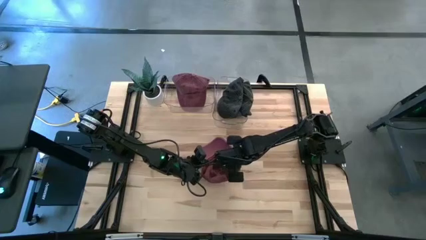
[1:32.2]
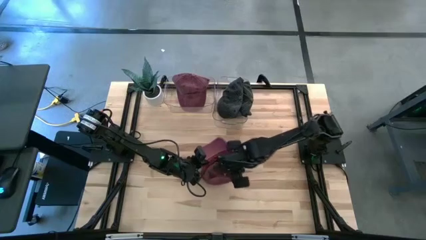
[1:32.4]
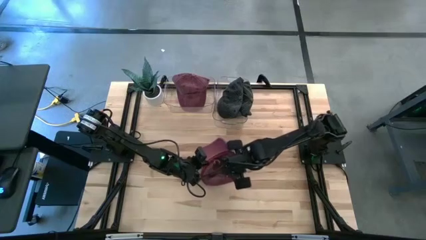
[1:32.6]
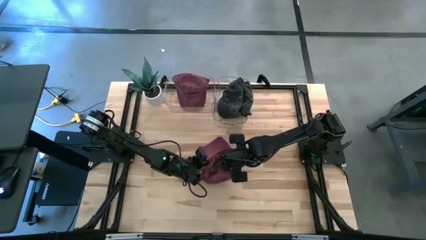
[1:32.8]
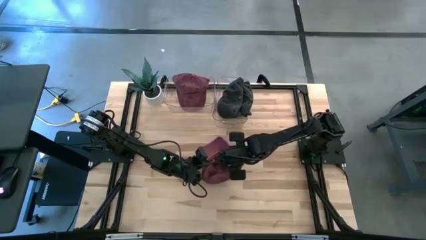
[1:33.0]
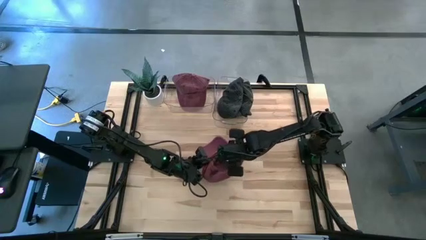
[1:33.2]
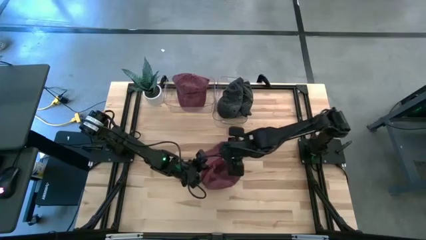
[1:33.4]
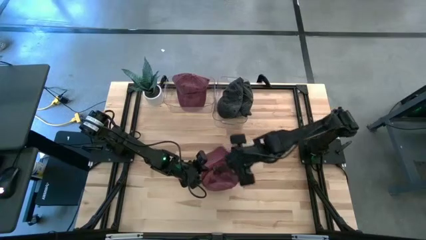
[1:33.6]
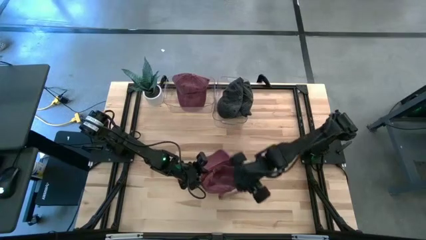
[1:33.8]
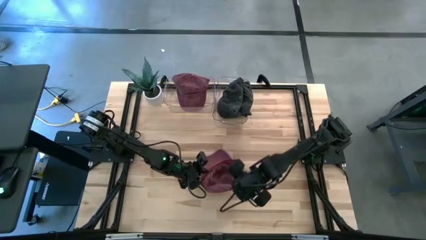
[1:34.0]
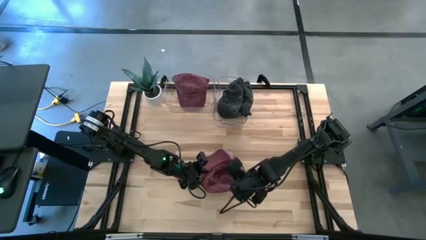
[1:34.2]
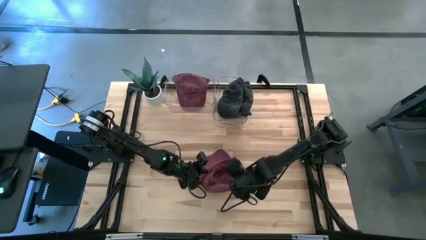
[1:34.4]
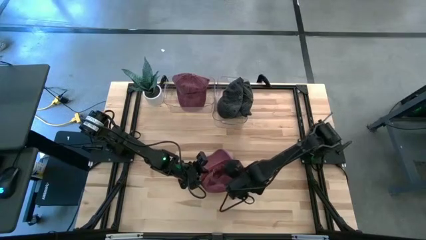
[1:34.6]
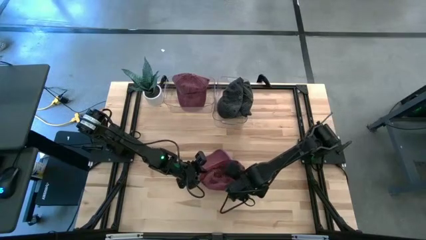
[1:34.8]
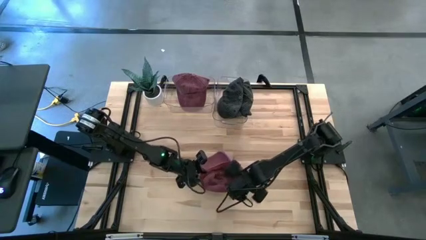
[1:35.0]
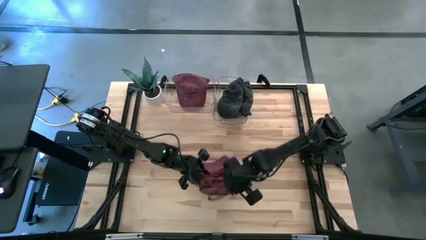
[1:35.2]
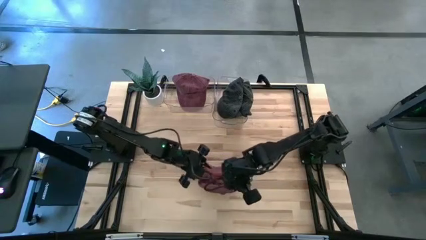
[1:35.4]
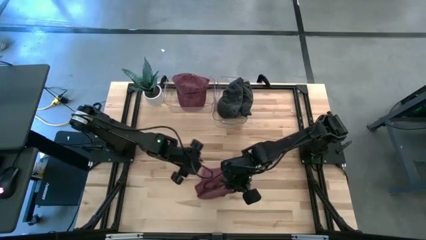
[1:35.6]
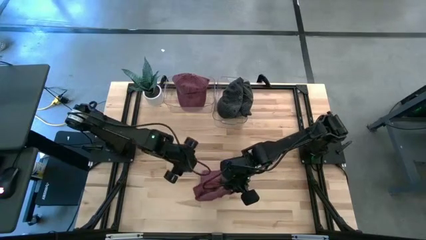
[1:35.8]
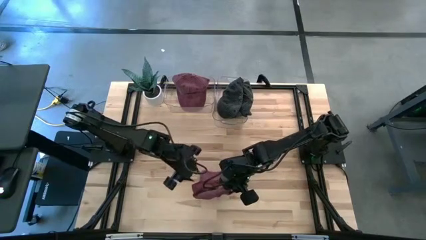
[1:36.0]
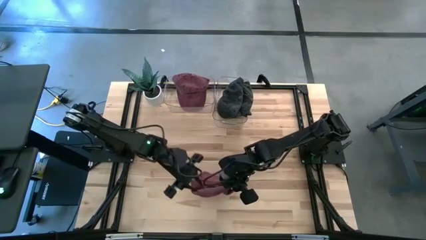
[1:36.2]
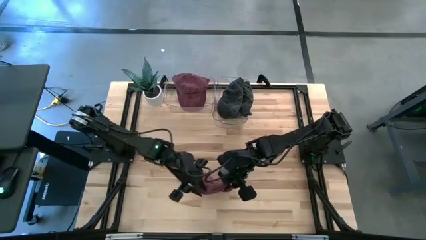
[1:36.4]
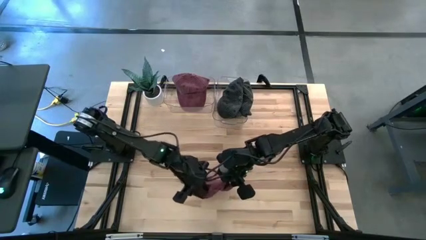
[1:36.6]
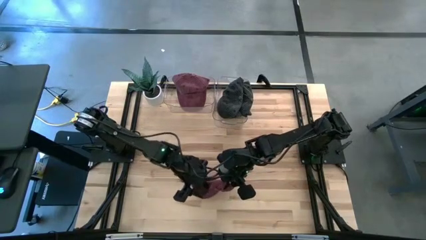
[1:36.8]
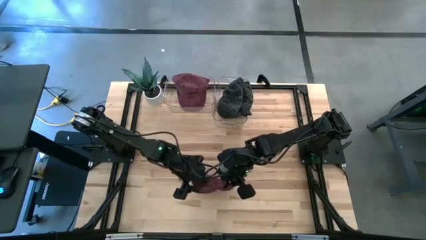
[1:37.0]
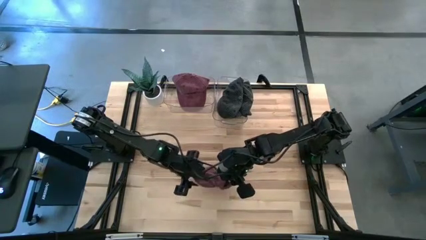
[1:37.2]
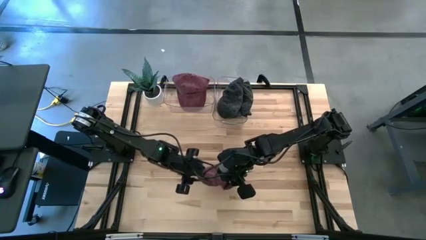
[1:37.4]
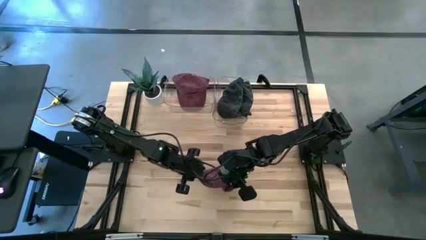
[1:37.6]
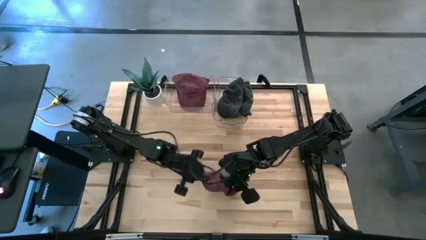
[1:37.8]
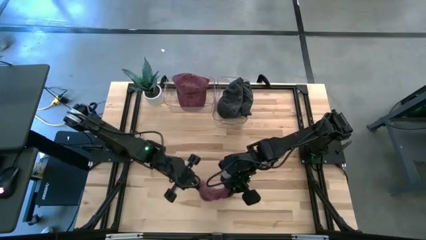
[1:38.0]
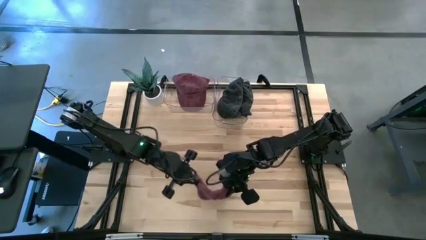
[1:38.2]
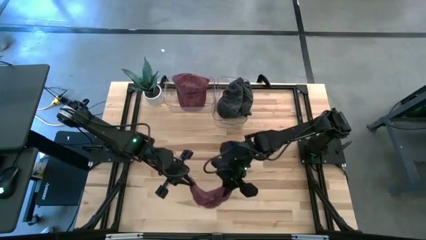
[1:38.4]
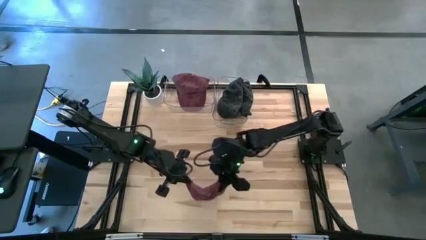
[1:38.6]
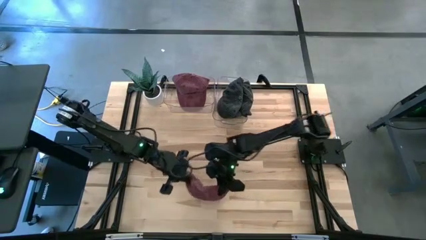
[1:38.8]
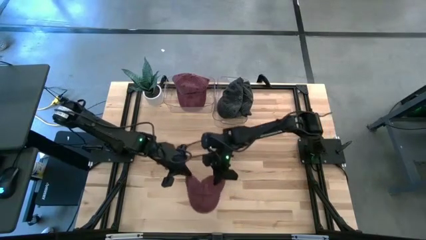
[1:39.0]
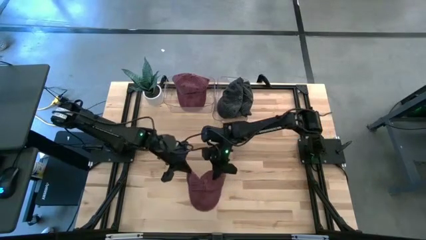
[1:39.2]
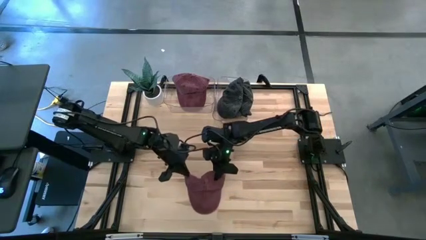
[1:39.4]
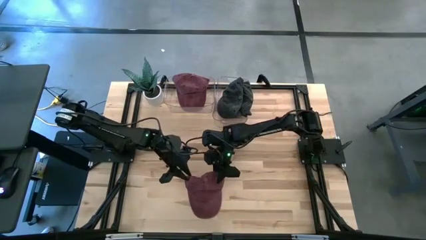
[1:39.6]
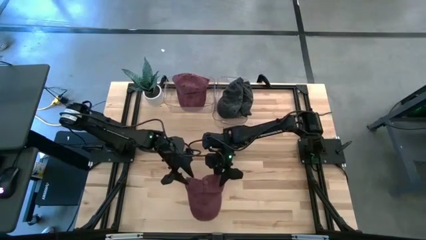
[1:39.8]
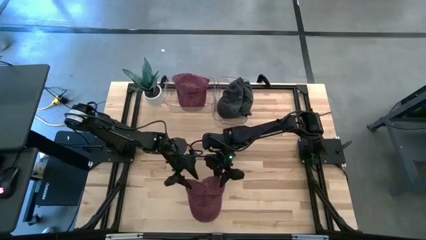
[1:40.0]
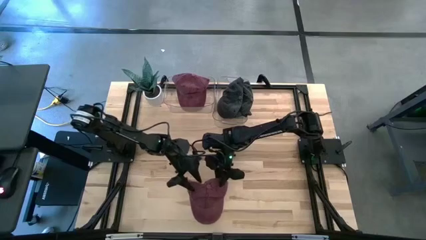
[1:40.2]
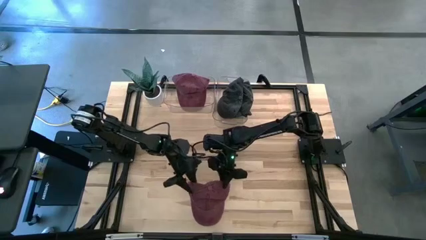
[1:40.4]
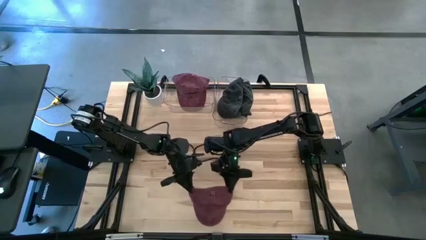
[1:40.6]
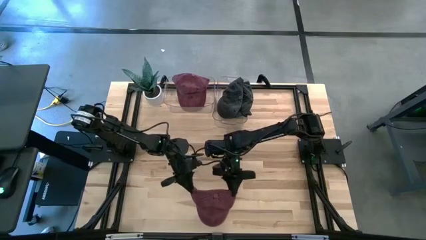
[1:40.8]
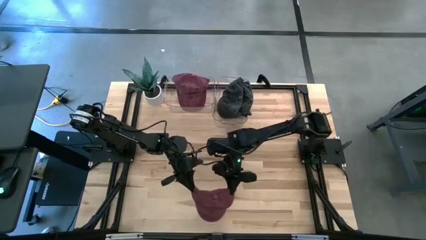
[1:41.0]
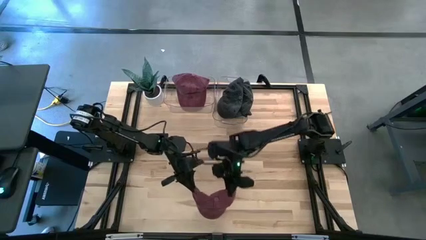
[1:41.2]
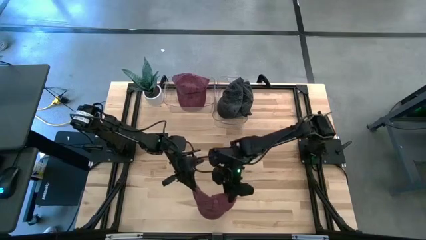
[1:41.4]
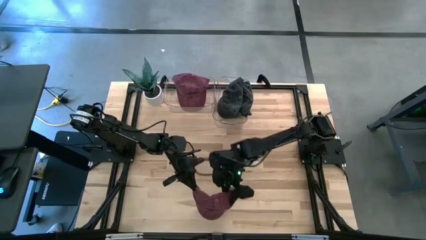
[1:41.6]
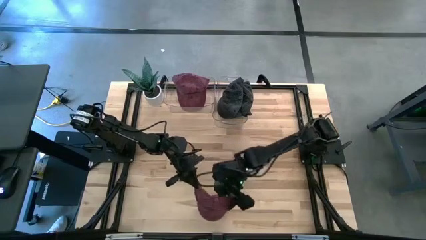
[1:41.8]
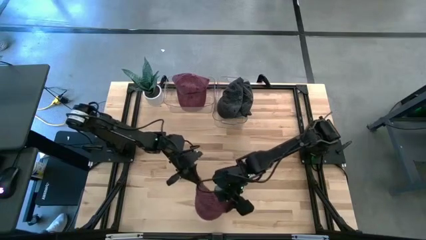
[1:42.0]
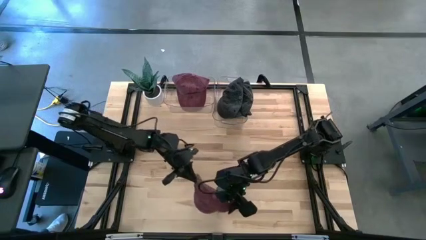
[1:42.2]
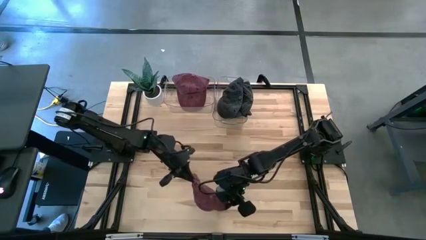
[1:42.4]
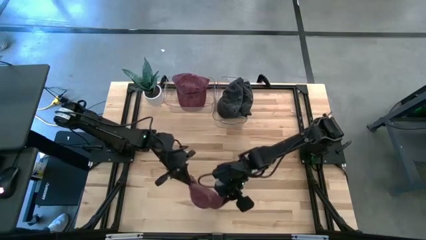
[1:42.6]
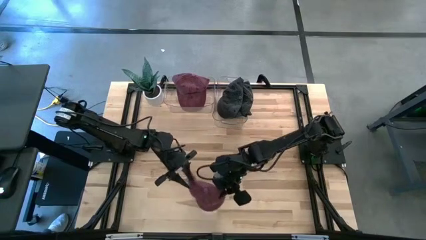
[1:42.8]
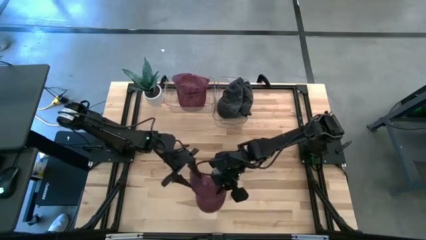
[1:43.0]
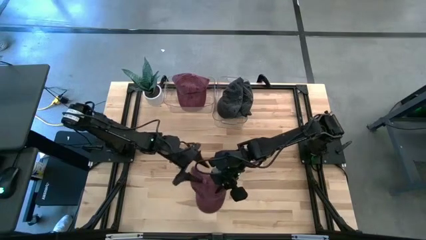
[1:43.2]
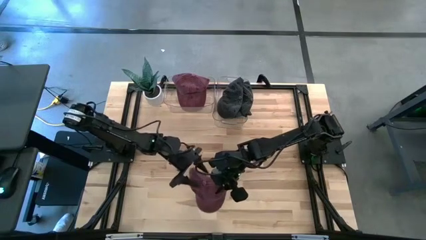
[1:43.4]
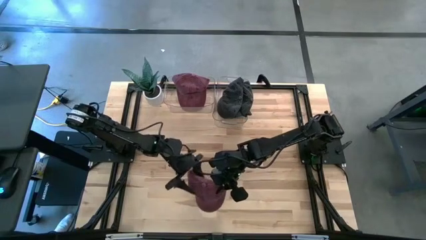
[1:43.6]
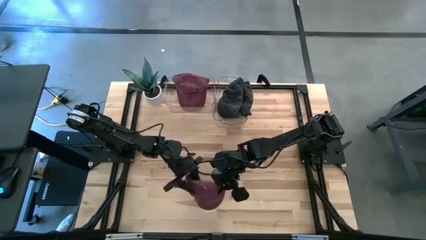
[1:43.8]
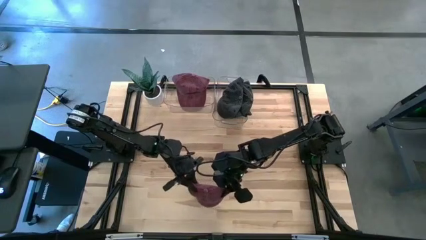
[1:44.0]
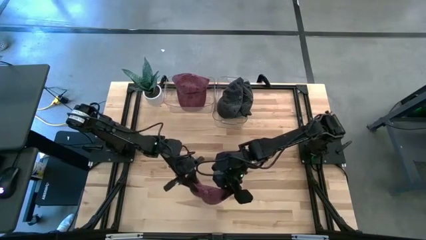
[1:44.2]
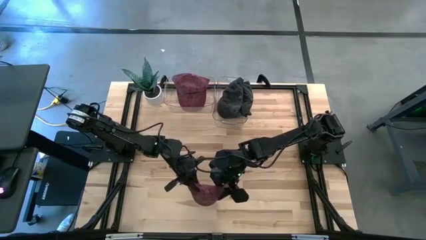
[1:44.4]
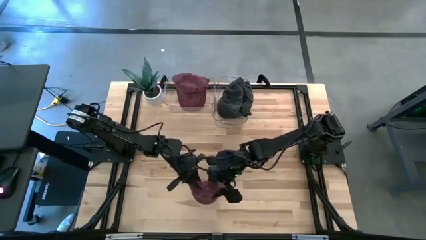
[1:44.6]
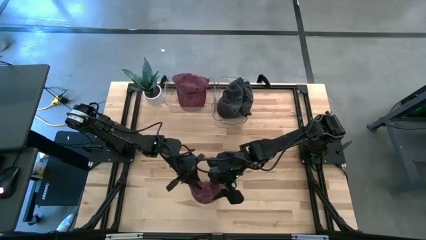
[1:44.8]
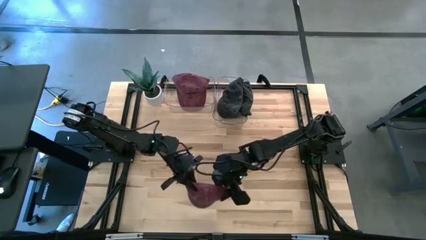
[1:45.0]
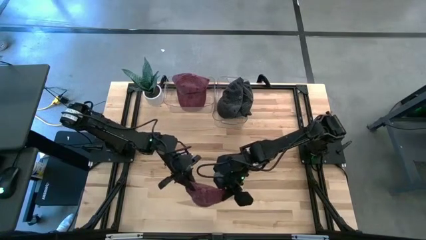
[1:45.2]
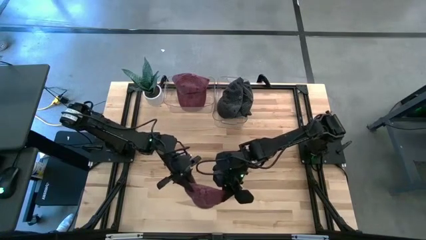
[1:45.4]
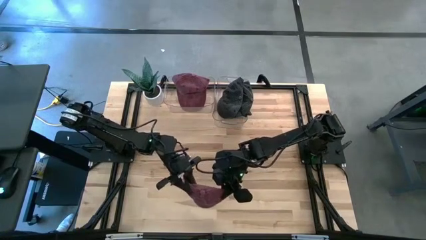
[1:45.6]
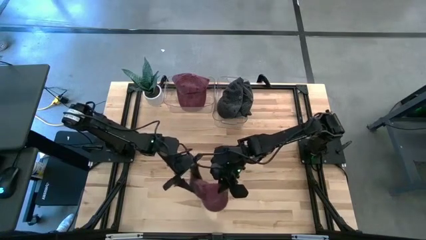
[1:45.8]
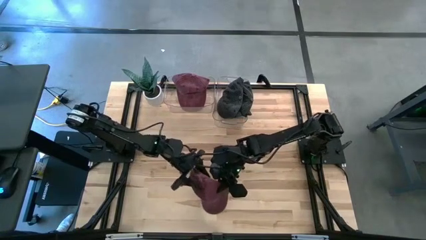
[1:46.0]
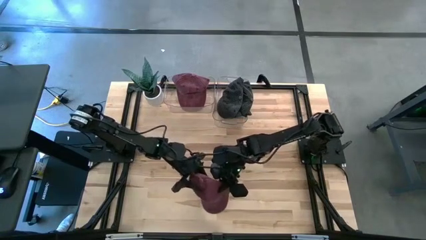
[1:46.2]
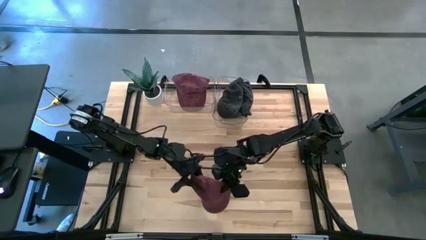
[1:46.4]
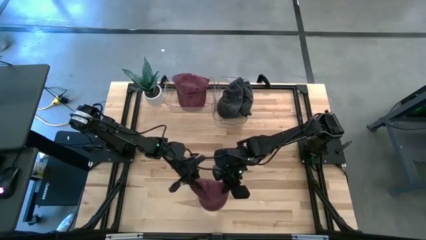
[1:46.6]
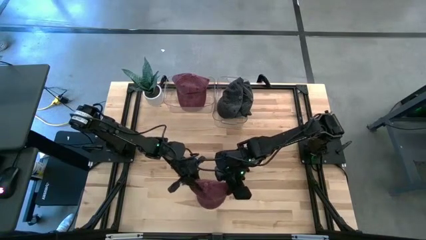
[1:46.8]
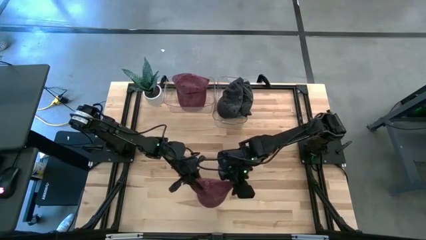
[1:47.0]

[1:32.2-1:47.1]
Task: Pick & Place hat
Put the red cap into the left transparent bin
